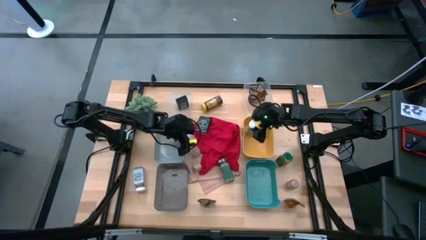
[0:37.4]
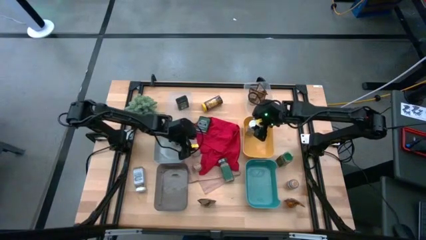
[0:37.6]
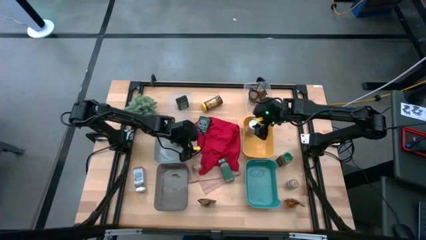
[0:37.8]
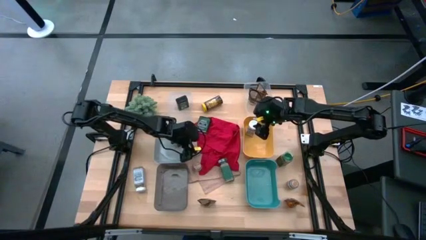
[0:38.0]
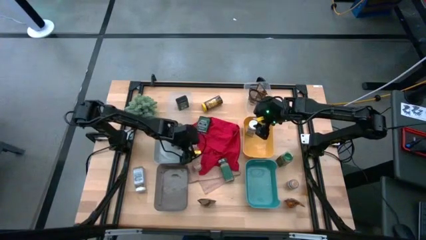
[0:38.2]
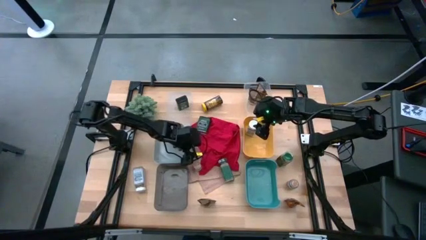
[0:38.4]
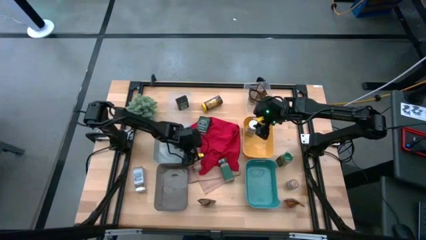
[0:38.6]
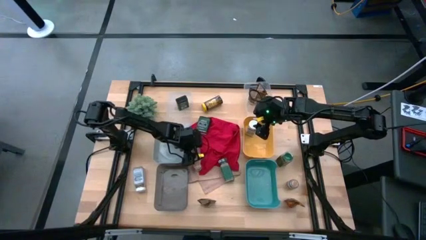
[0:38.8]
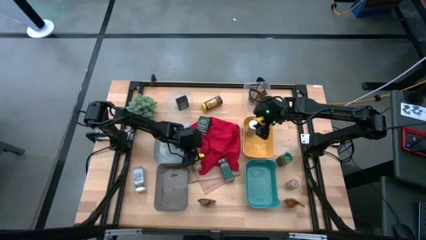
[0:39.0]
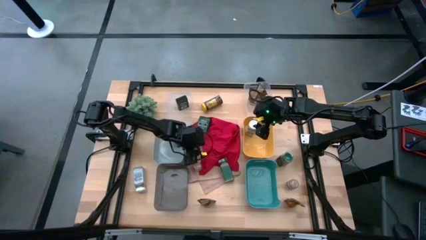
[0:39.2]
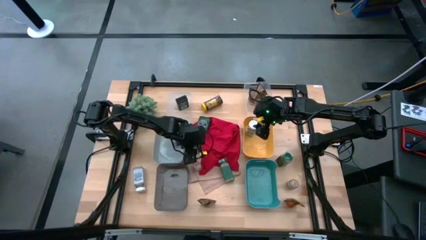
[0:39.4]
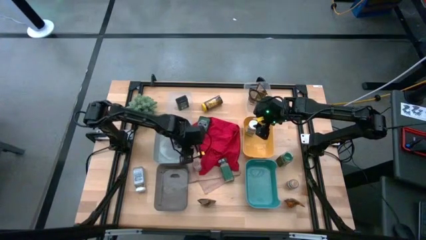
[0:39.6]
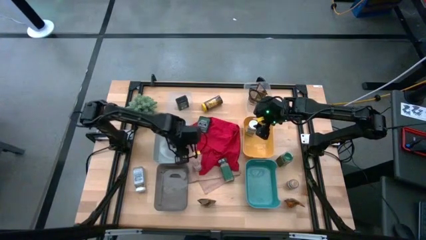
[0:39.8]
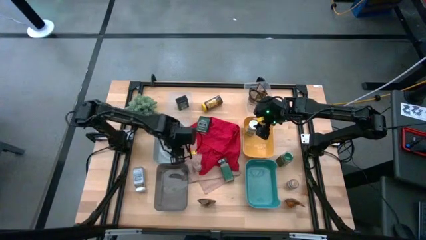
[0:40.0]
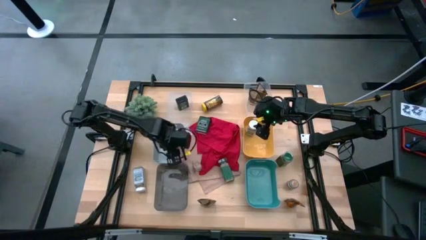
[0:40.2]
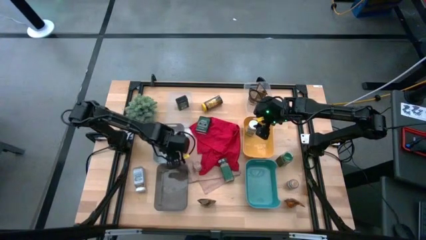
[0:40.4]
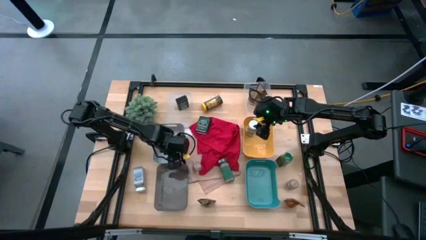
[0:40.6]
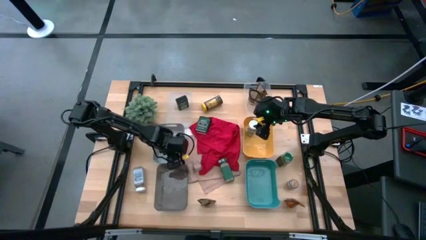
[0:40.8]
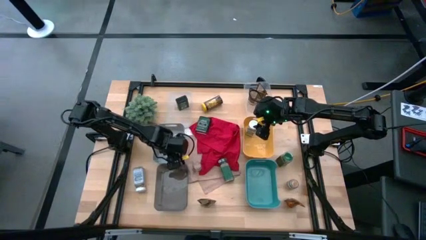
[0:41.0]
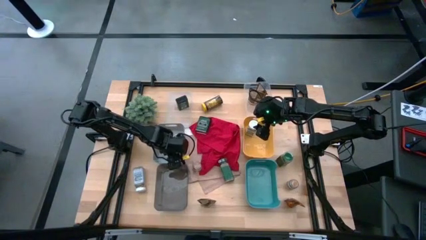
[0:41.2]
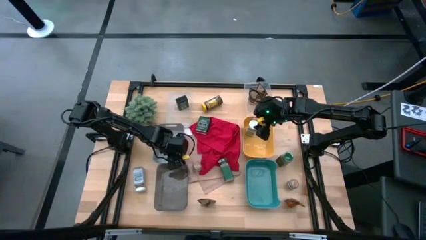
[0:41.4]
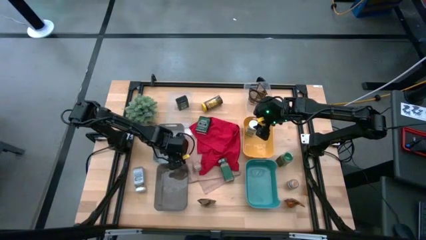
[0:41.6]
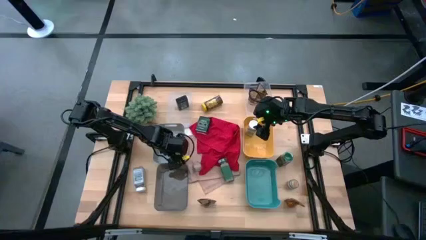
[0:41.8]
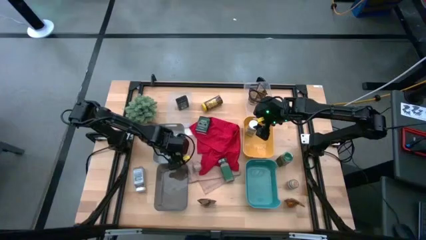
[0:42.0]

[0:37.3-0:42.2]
Task: Sort spices by type
Put the top left brown seasoning bottle into the gray bin

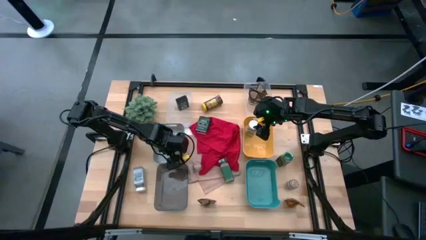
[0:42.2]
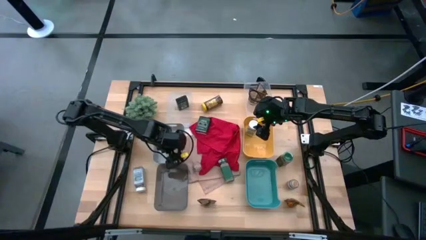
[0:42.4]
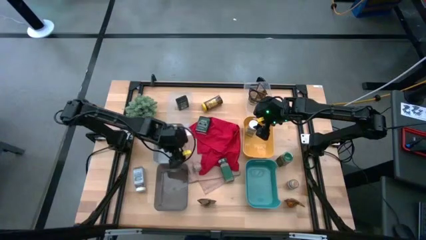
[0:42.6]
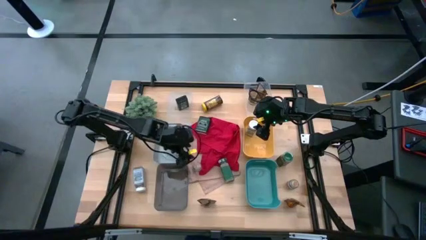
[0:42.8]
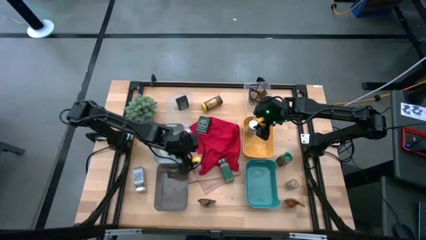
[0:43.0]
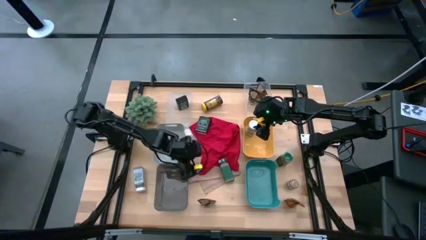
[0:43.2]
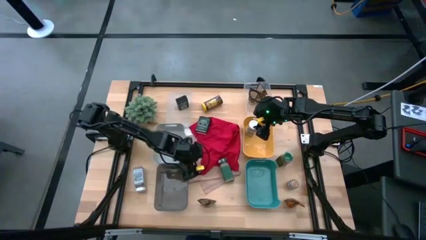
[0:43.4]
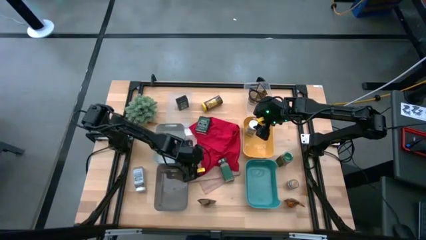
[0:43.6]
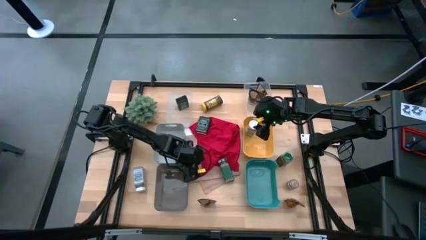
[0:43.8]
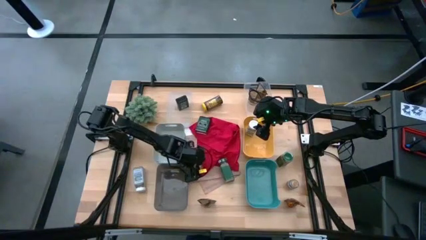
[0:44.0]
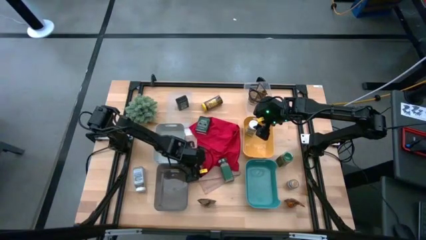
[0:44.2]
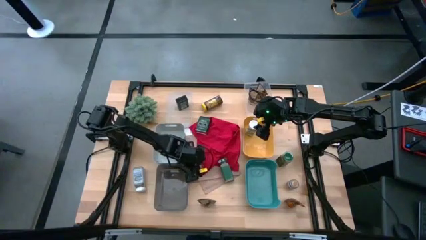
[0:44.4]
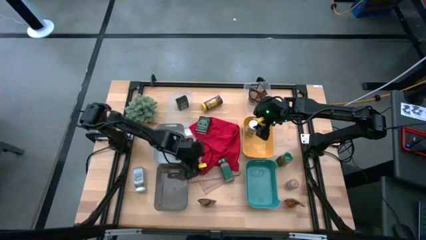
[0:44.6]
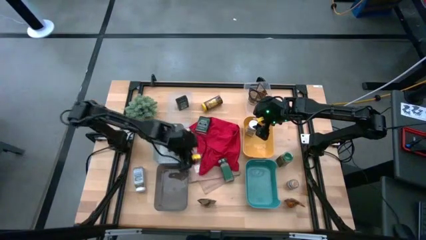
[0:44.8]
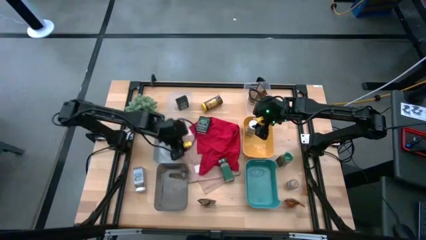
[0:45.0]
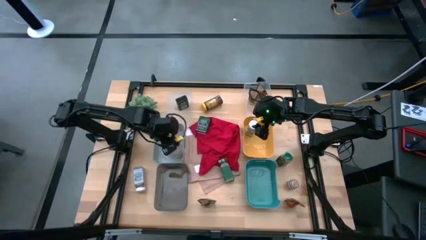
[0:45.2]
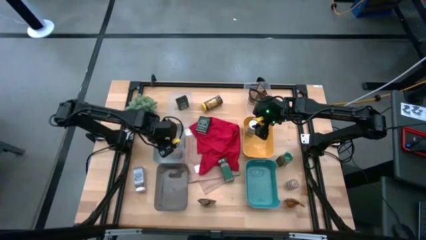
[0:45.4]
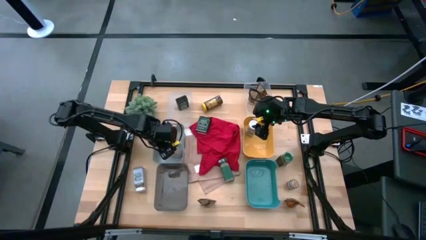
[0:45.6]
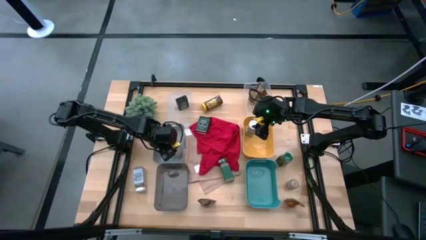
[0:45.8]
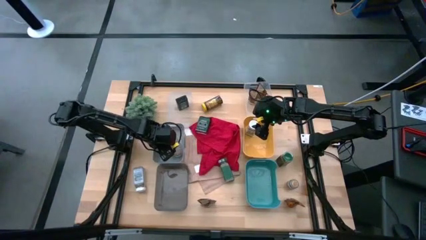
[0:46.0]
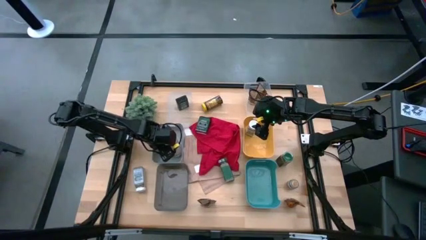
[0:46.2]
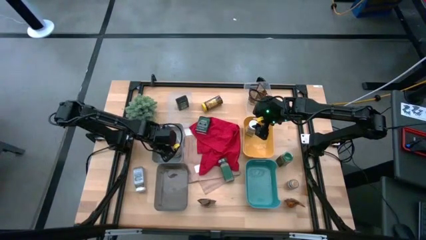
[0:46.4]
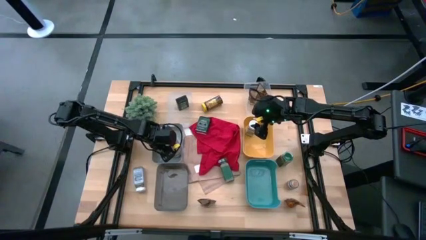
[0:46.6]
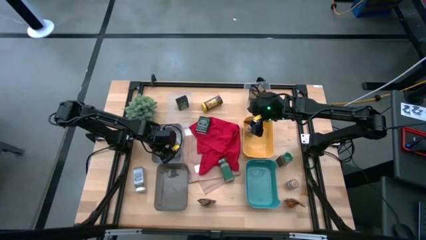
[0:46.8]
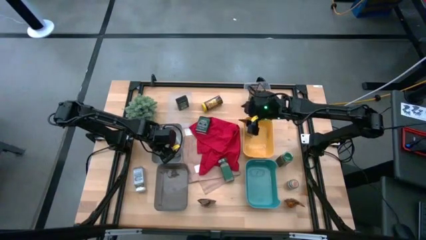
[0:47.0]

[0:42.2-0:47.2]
Put the left brown seasoning bottle into the gray bin

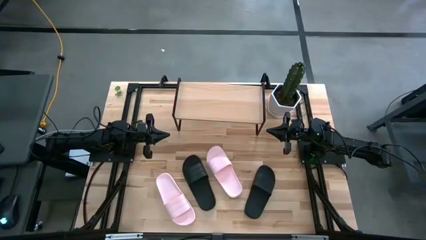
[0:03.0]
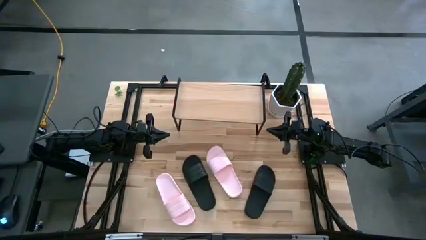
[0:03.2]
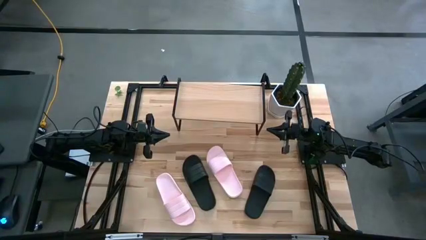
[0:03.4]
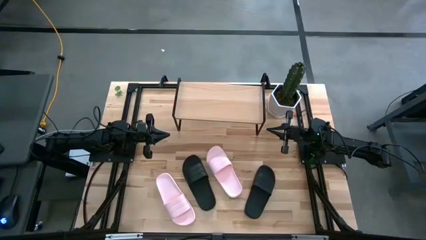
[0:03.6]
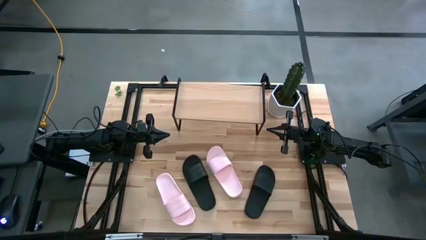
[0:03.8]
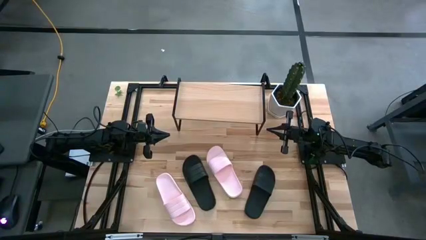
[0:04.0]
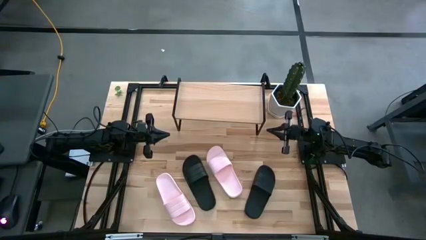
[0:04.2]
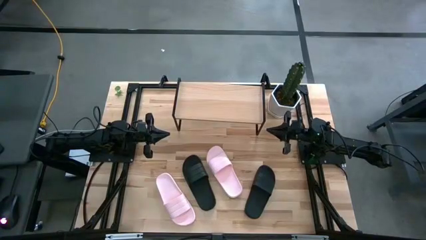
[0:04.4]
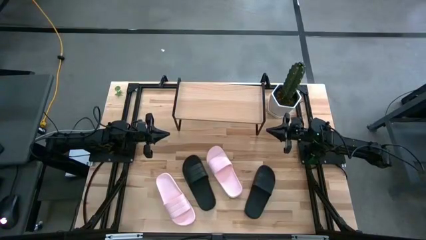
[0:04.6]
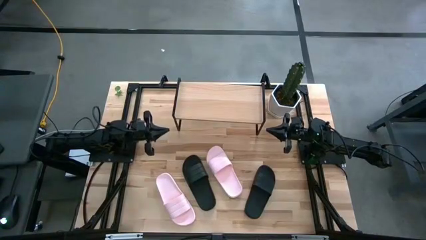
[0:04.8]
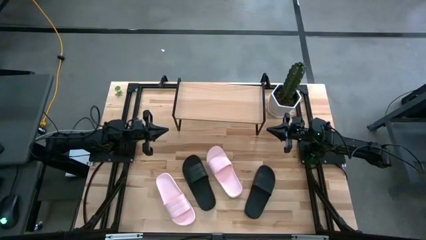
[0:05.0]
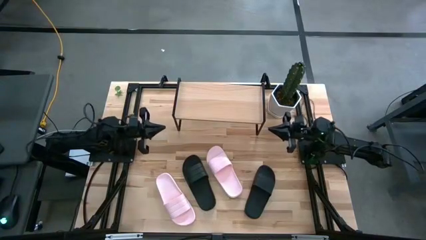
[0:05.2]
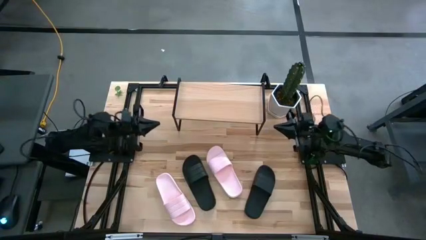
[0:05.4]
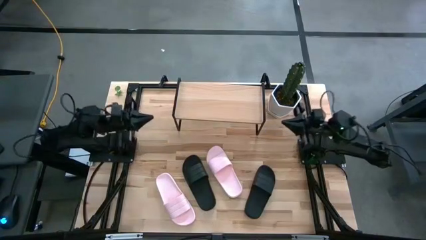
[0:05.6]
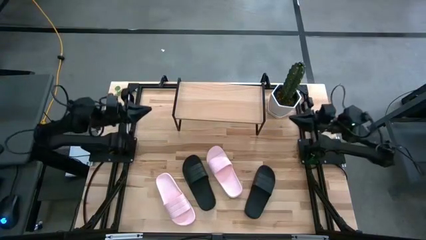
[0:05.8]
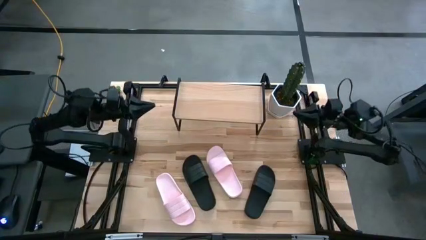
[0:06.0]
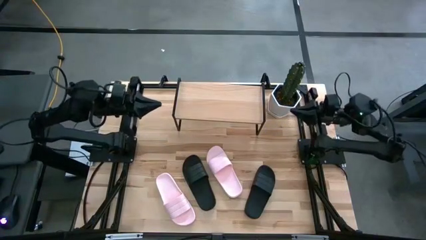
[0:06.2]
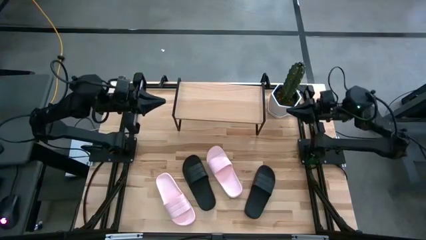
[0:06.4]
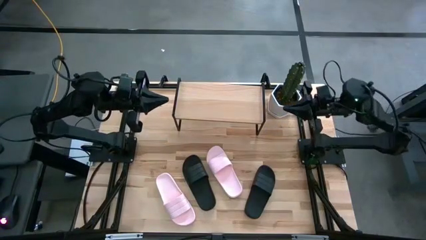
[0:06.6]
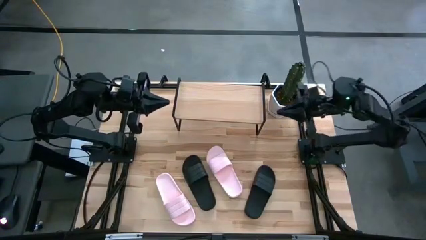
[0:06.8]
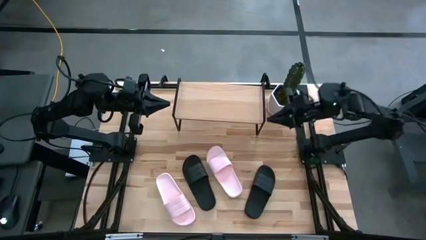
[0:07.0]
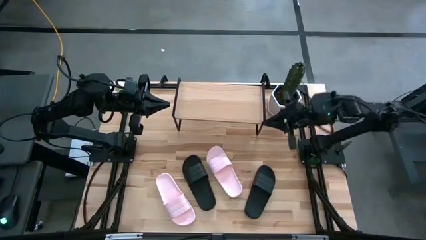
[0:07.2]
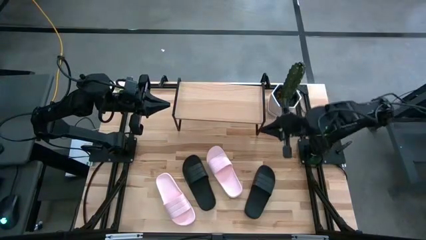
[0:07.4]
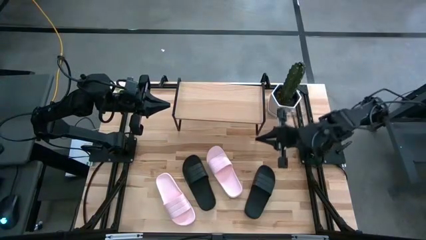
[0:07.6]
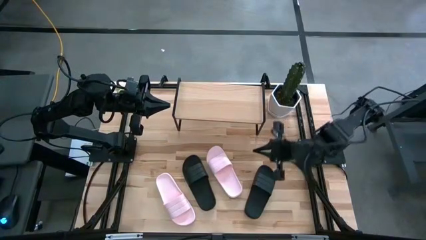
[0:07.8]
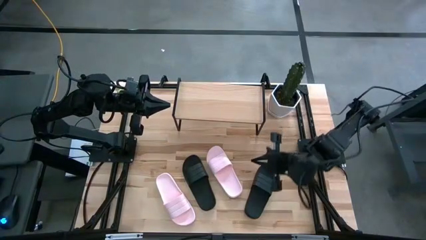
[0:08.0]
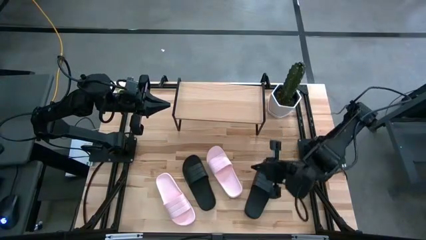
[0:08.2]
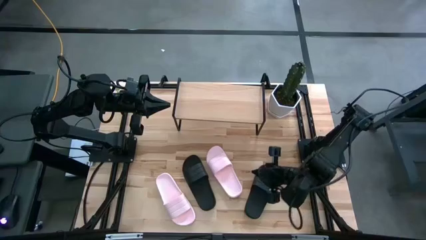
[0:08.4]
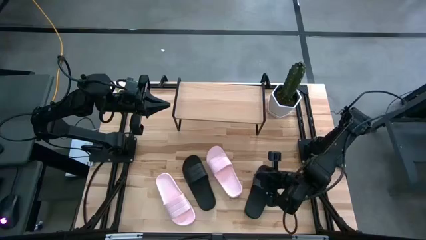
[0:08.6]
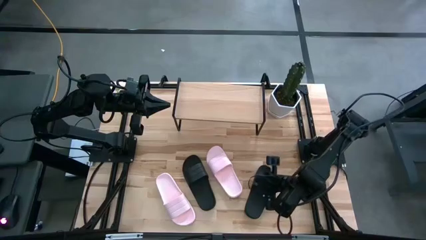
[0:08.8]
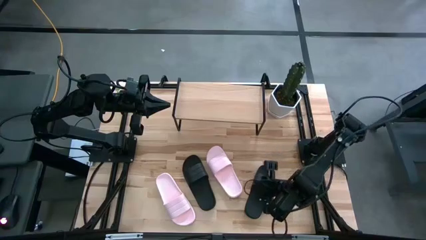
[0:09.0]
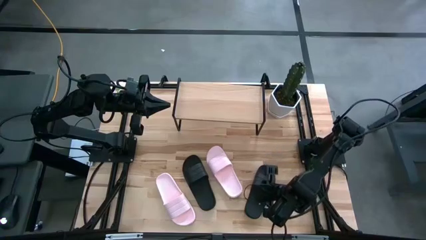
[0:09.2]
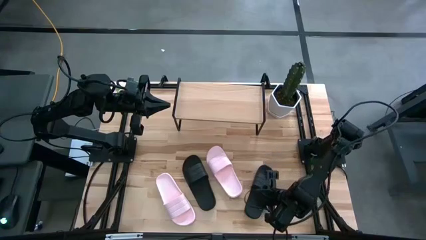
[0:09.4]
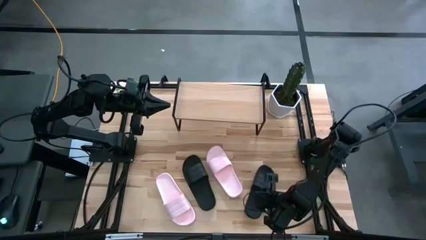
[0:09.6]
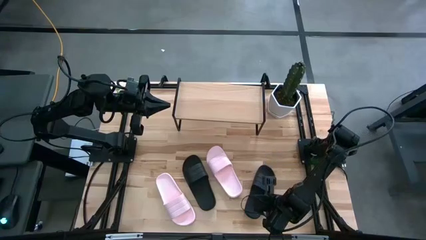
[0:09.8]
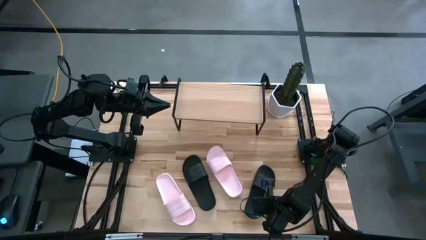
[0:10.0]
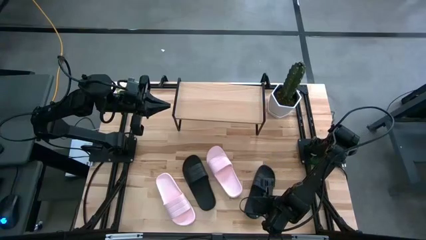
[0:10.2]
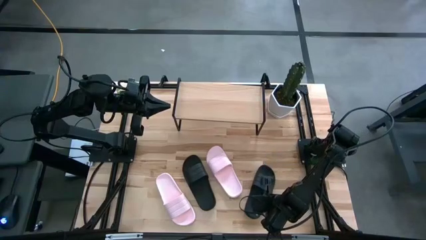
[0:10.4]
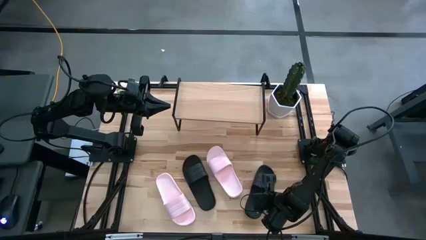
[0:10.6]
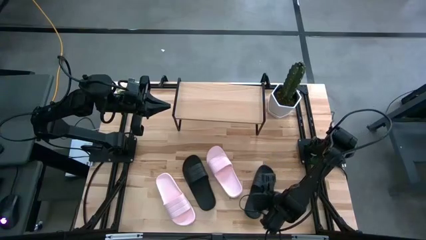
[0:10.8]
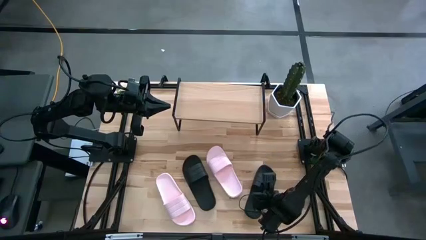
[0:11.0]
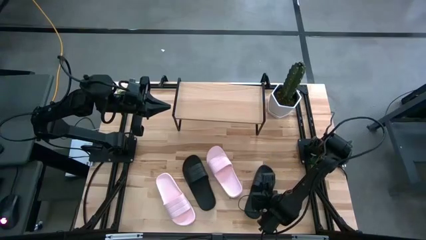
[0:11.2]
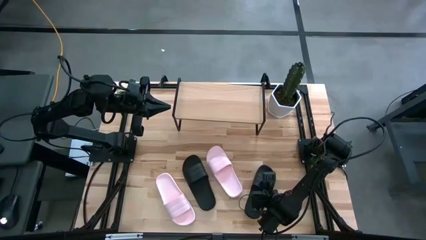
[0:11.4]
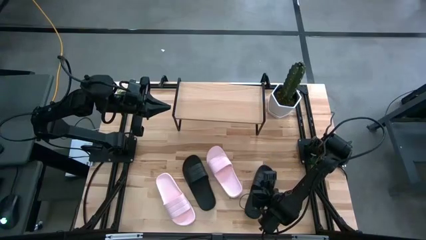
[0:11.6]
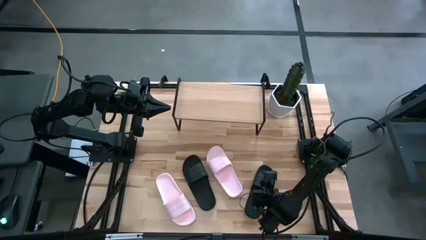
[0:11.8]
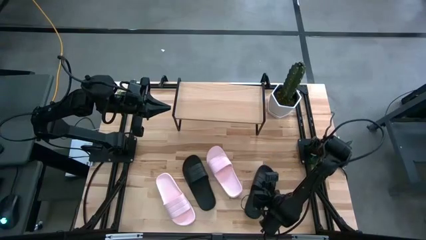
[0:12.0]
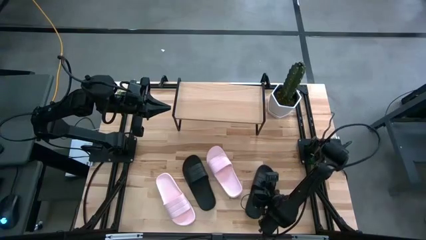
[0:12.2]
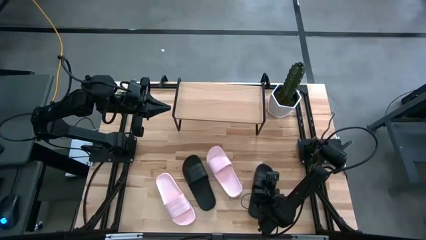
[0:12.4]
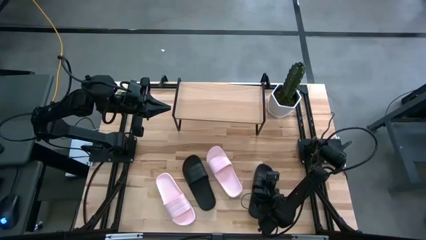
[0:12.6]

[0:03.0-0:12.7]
Task: Pick and place slides into the shelf
Put the right black slide on the shelf
